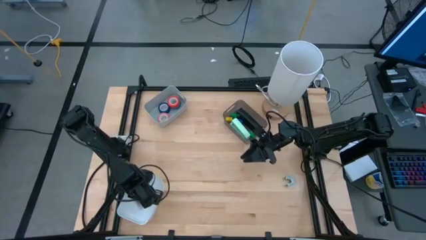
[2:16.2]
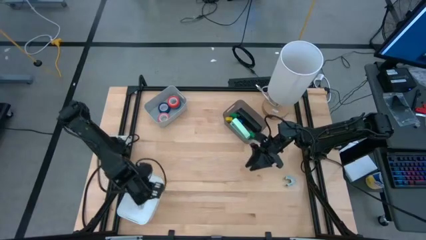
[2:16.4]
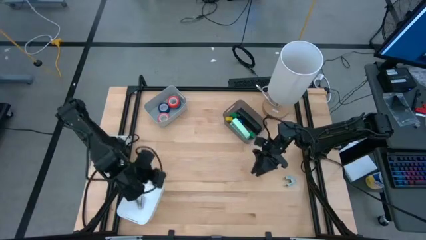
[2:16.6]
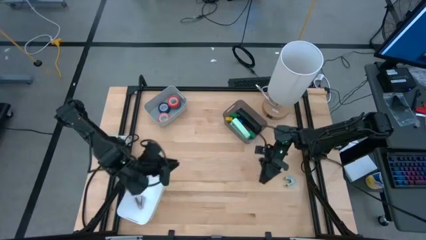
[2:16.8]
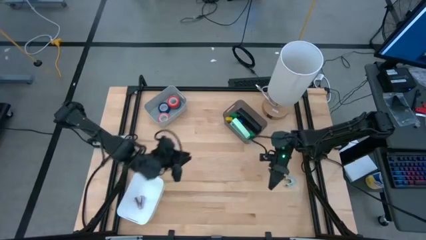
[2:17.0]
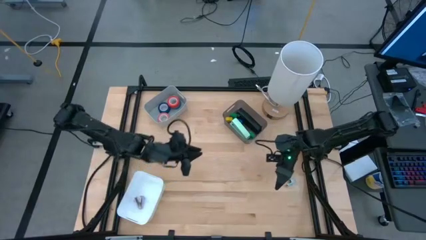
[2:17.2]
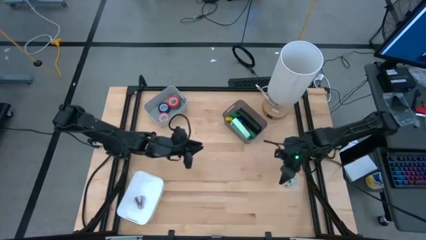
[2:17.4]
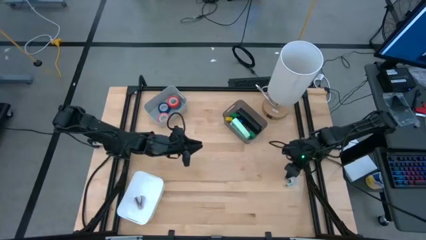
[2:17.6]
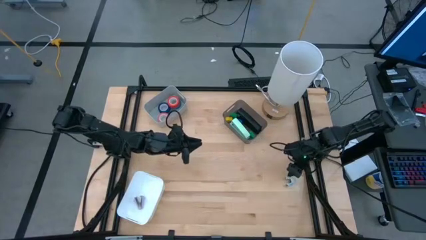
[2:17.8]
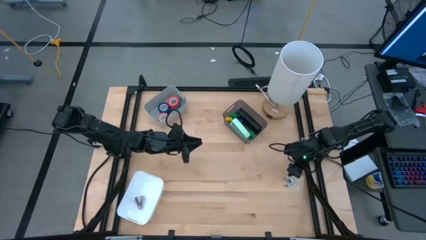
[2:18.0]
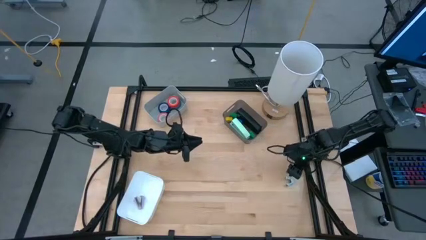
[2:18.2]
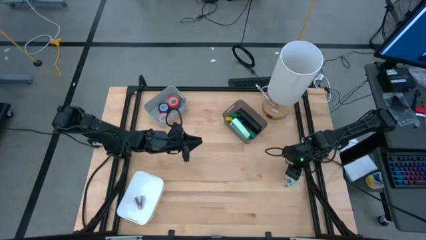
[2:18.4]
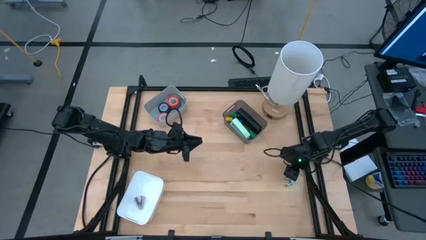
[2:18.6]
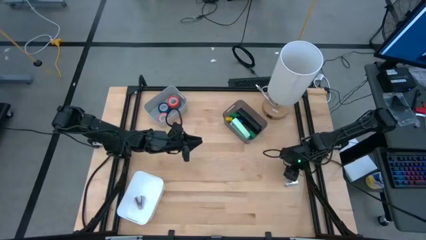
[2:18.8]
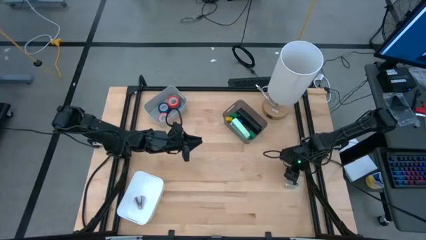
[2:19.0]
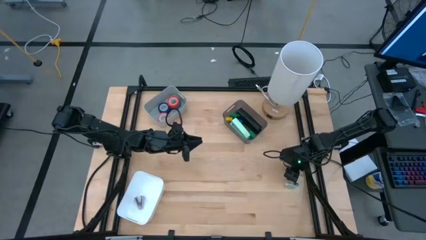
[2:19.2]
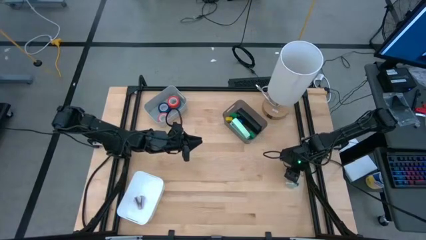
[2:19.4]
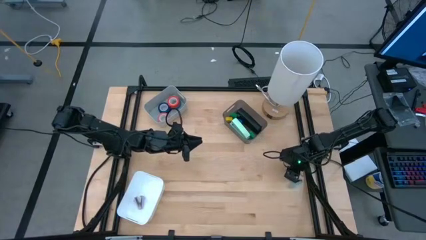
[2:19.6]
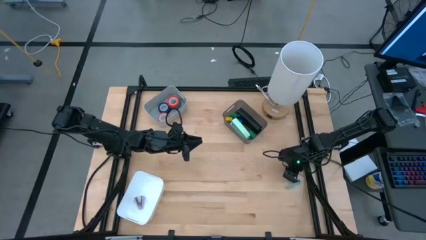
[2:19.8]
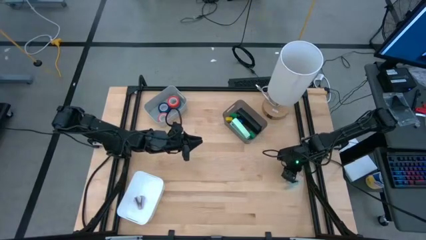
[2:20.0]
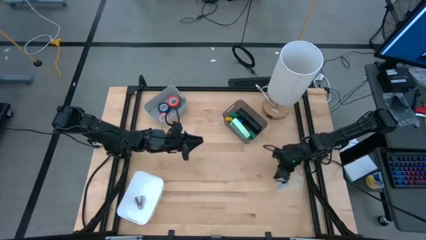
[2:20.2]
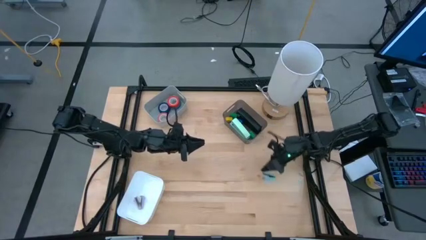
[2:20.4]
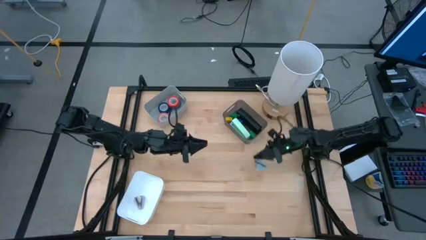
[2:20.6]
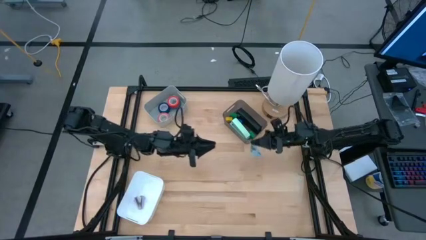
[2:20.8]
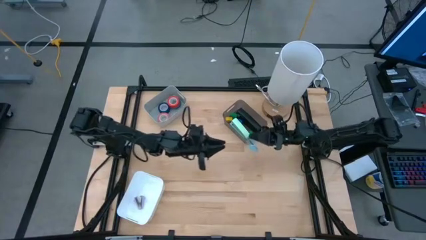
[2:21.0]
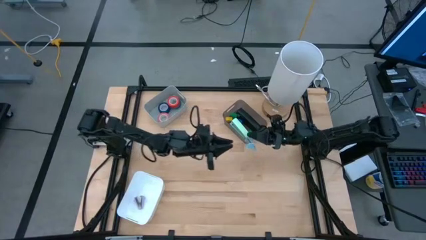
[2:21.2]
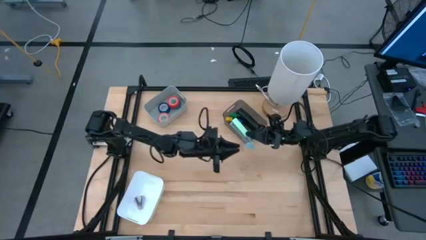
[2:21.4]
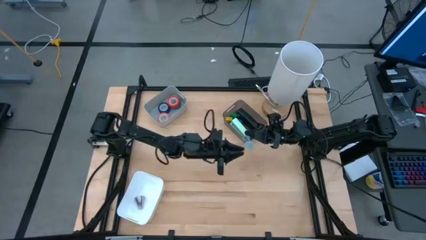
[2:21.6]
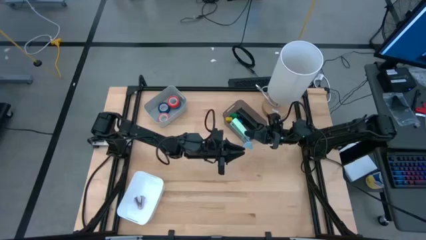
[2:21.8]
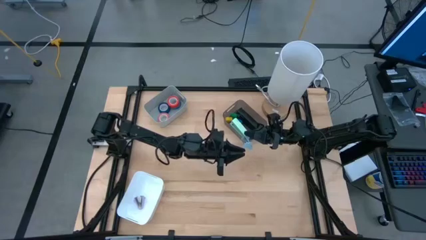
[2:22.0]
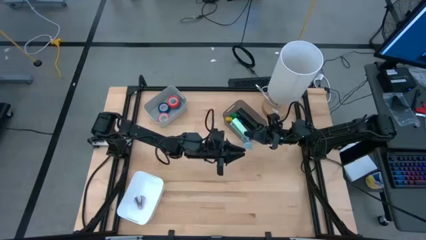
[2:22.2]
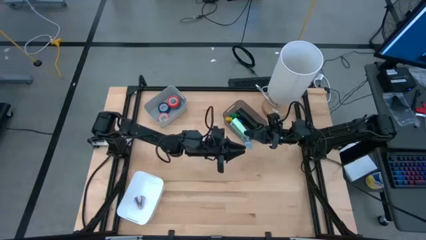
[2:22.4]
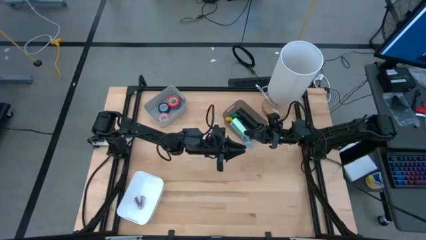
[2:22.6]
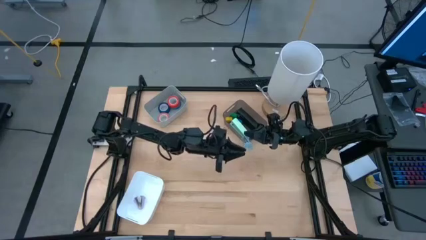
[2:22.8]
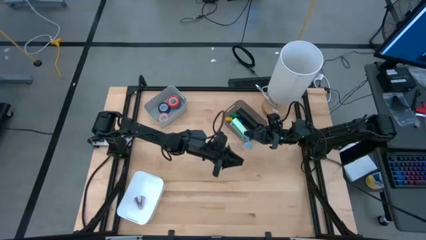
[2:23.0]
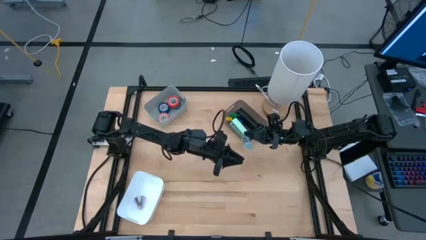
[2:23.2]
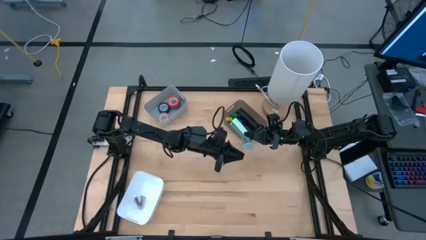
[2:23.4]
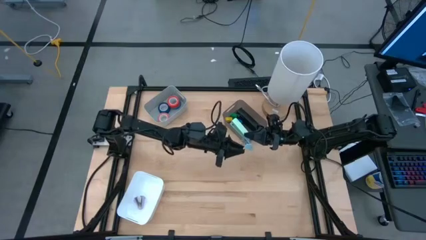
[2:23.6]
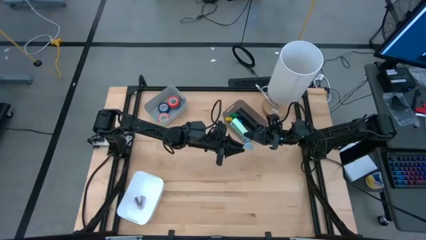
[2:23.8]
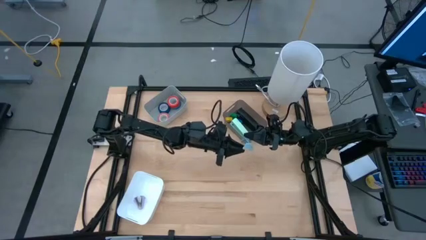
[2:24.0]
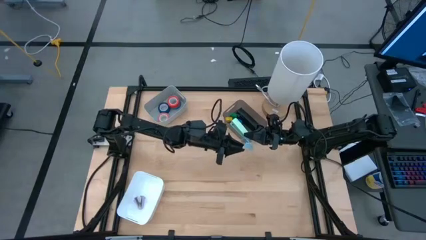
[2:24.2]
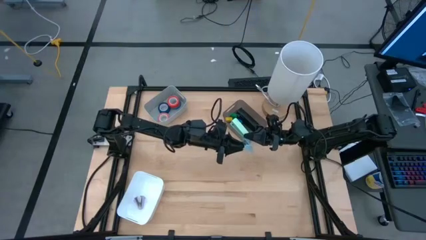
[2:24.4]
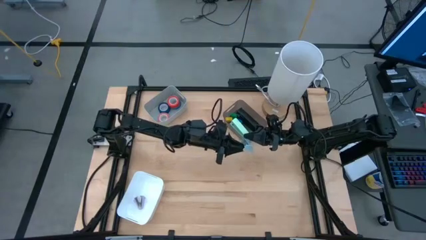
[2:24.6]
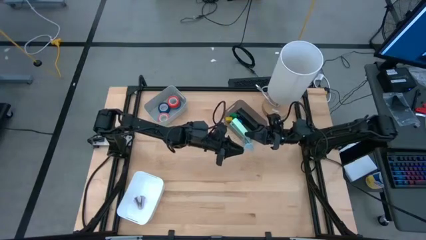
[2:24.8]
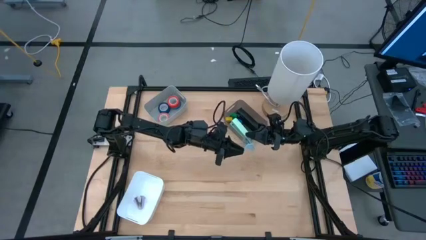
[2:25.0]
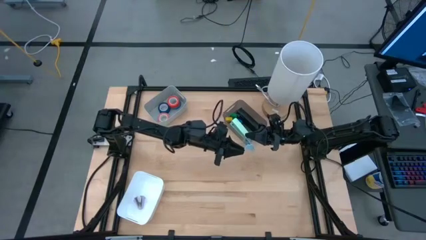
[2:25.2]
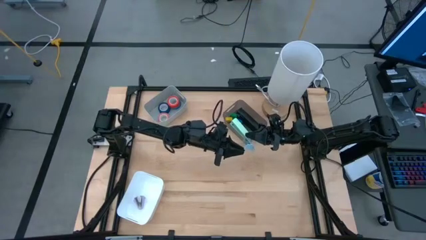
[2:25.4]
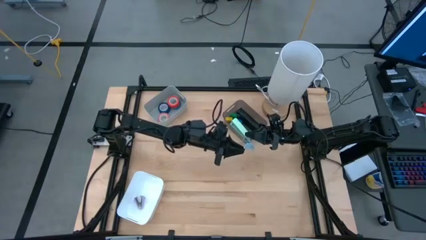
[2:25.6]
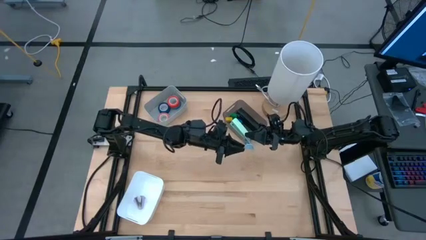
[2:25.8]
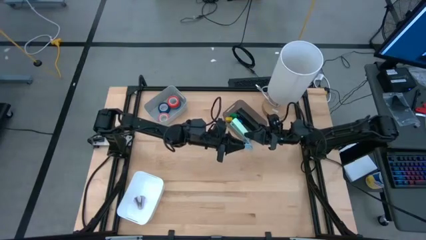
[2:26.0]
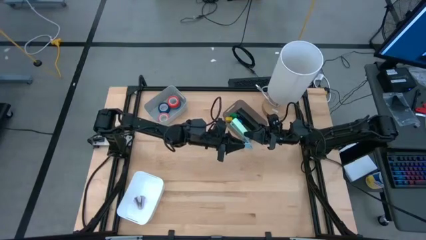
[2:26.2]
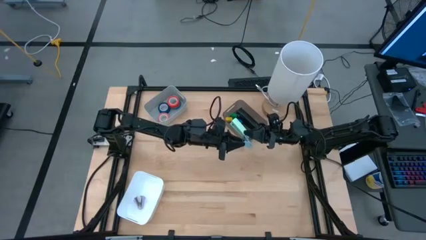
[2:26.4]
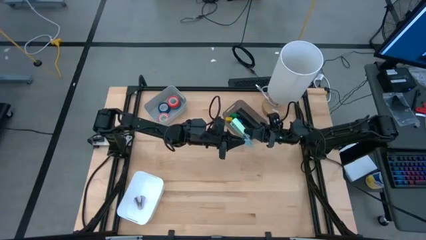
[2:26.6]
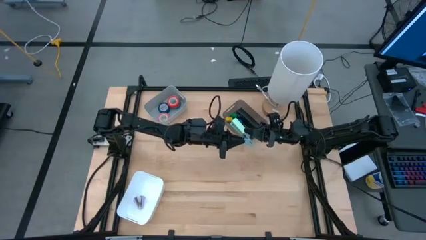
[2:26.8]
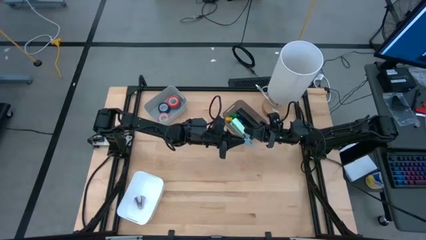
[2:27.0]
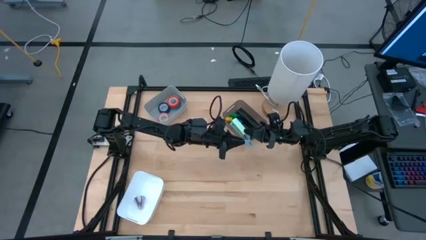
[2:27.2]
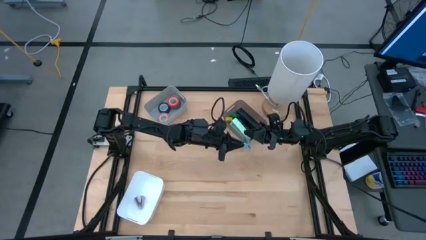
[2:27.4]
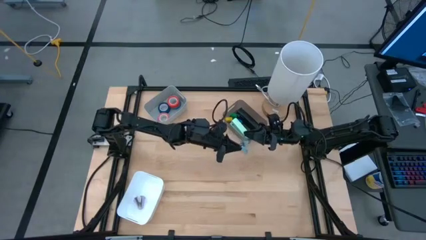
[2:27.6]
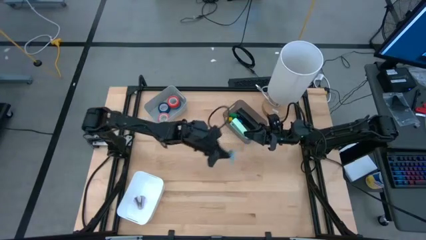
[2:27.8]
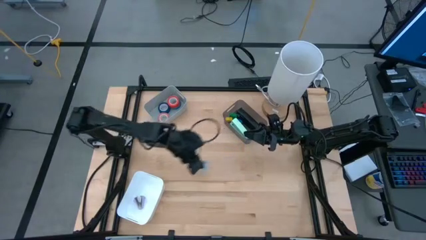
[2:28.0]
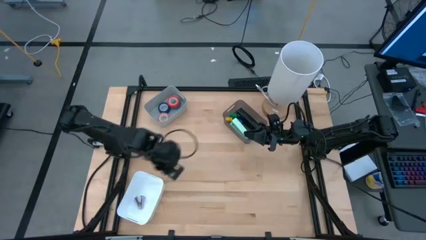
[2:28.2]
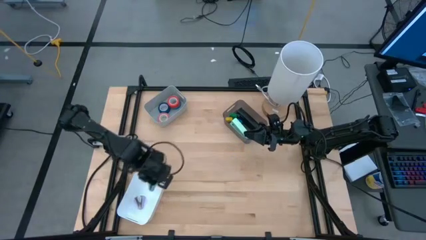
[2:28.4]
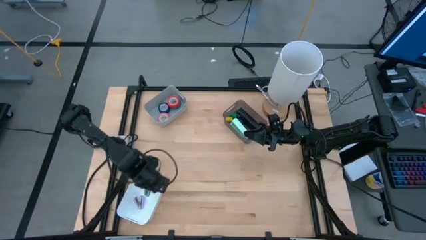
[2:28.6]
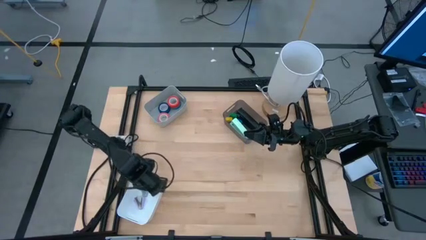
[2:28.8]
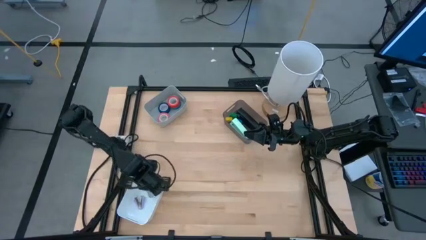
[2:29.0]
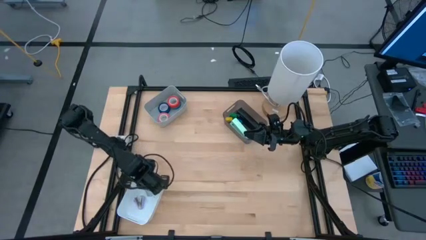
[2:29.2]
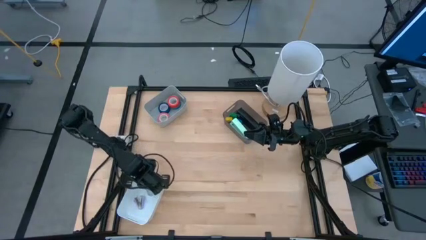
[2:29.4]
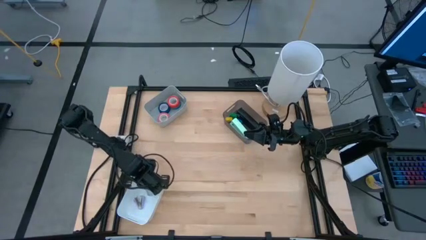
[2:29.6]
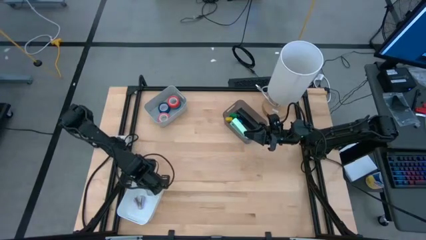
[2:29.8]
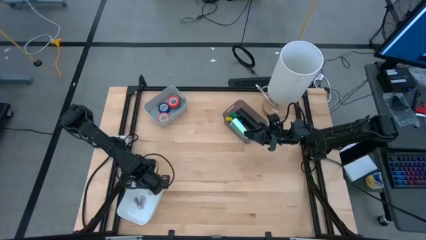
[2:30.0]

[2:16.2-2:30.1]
Task: Pick and place Stapler, Stapler remover, tape
Put the blue staple remover into the white bin

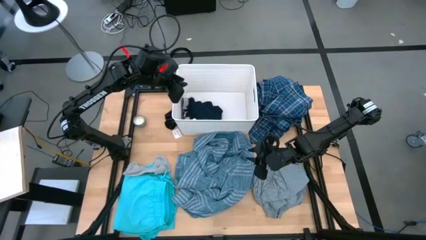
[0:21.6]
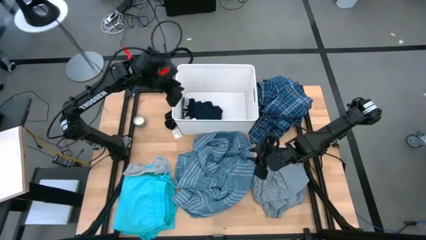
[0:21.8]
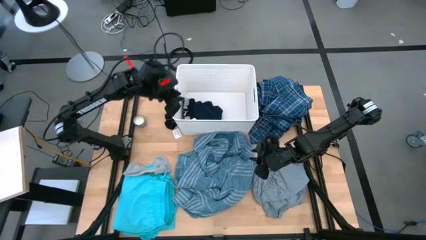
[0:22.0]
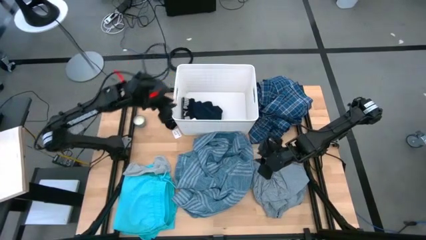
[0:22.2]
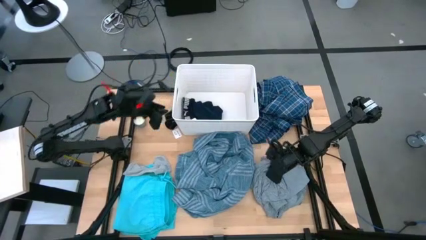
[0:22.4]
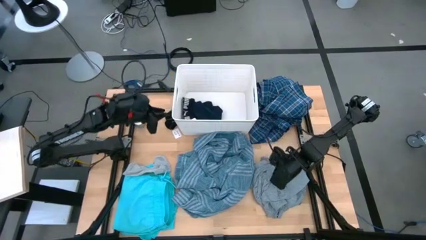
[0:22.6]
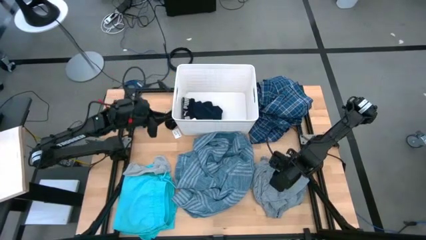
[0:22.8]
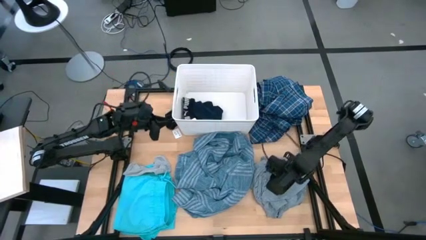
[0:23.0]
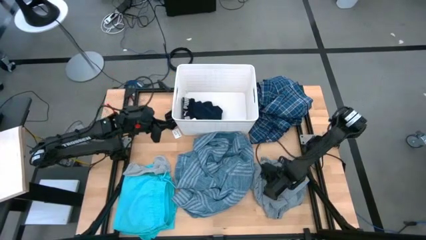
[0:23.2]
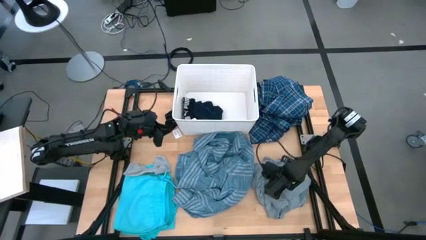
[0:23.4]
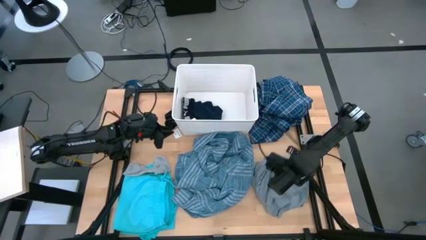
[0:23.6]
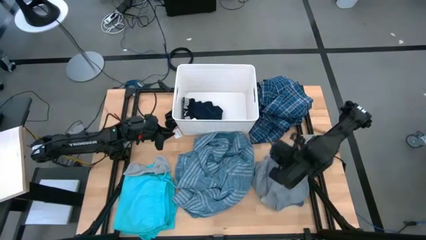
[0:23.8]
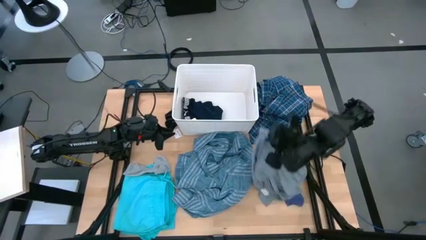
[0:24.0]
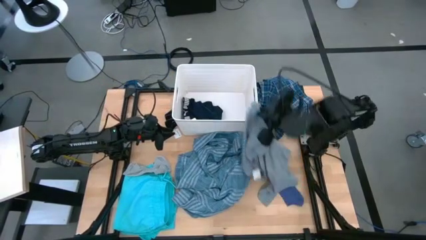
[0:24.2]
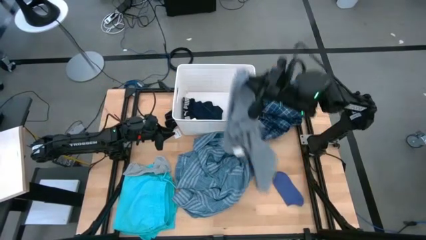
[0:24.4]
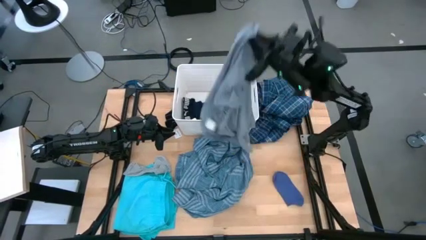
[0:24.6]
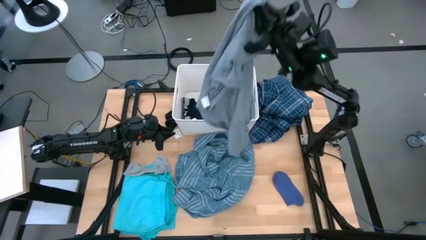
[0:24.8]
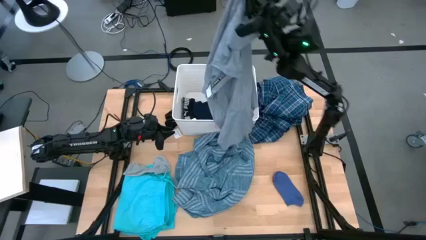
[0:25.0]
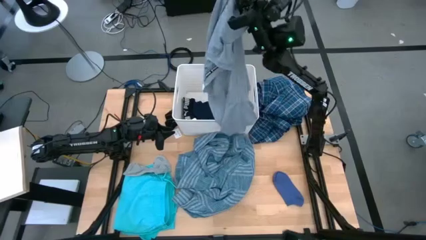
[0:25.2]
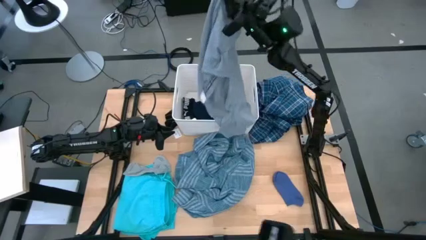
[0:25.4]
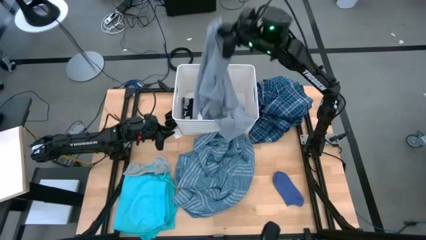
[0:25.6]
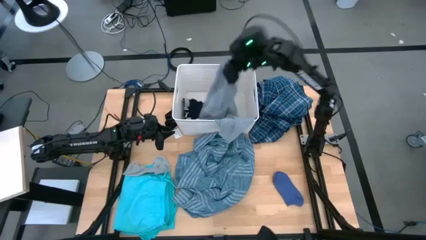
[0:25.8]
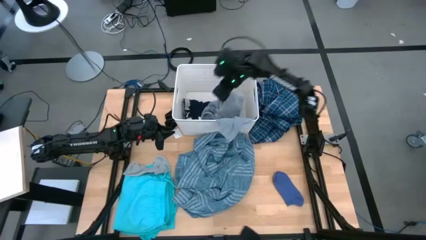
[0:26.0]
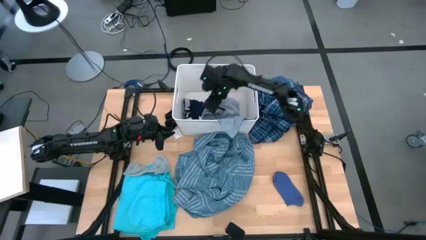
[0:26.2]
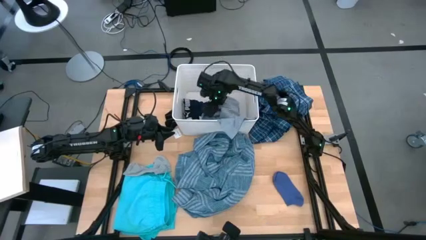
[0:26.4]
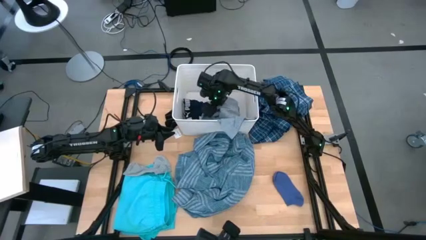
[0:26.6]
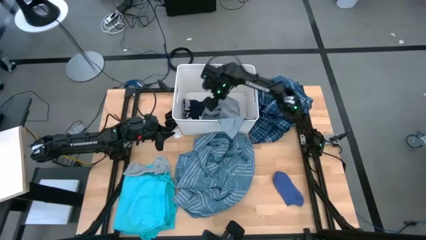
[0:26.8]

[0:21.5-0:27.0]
Task: Sort clothes
Put the gray shirt into the white laundry bin
